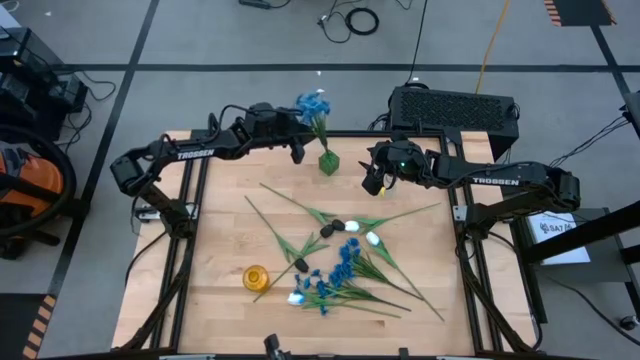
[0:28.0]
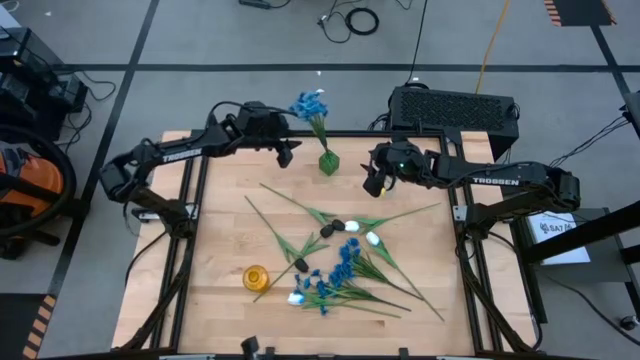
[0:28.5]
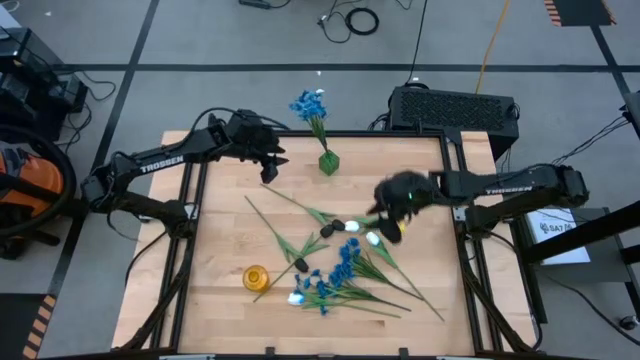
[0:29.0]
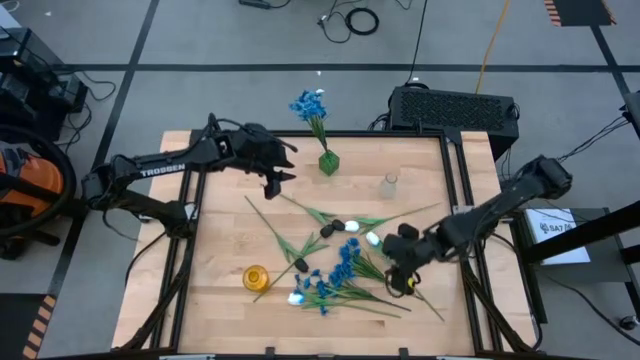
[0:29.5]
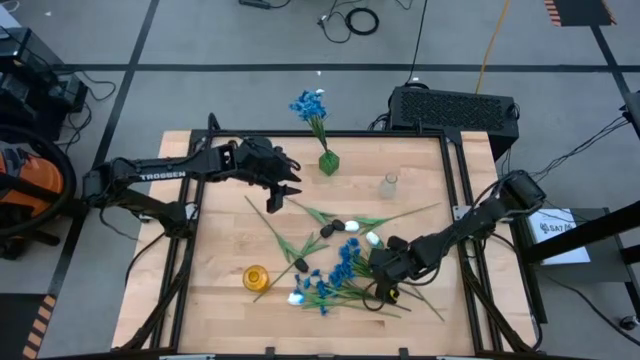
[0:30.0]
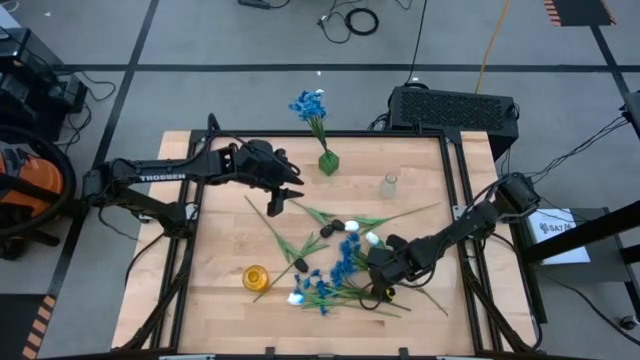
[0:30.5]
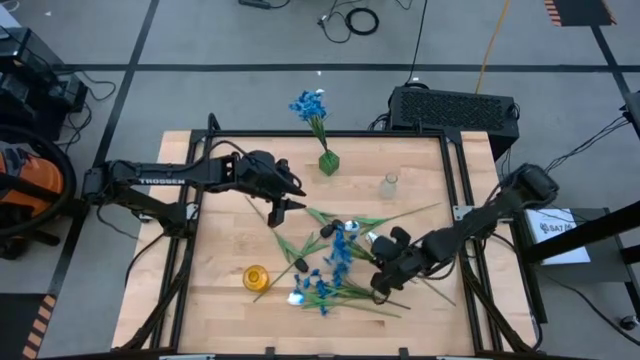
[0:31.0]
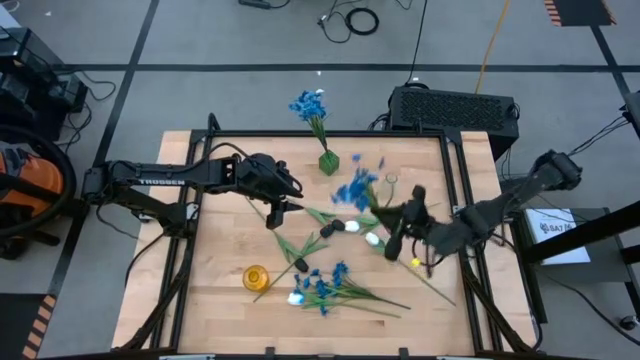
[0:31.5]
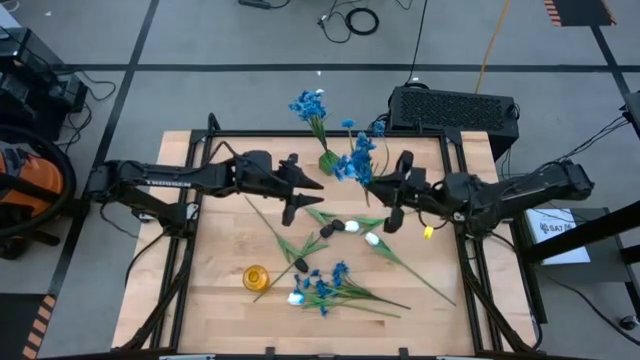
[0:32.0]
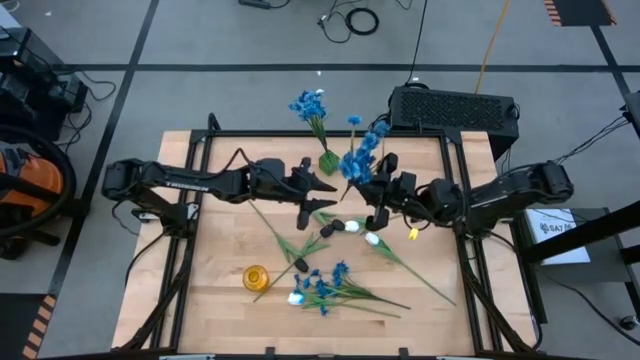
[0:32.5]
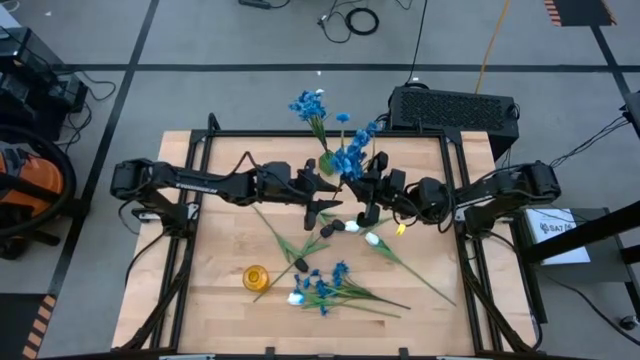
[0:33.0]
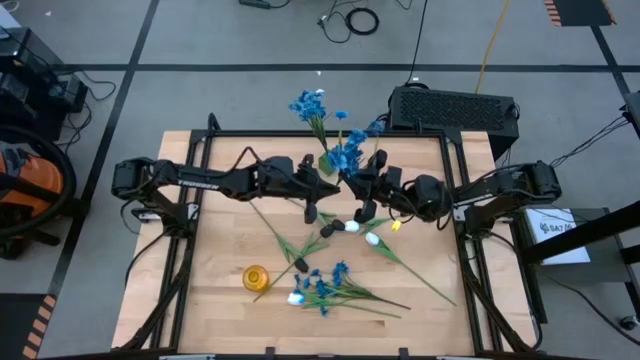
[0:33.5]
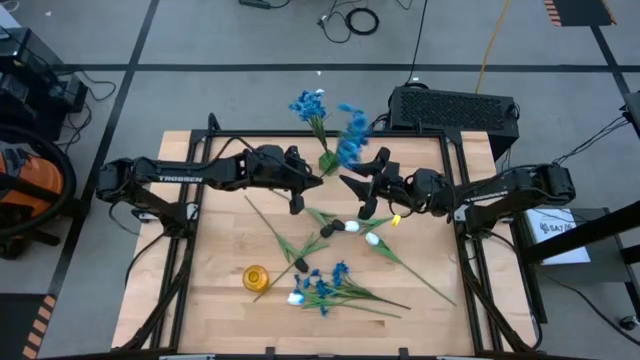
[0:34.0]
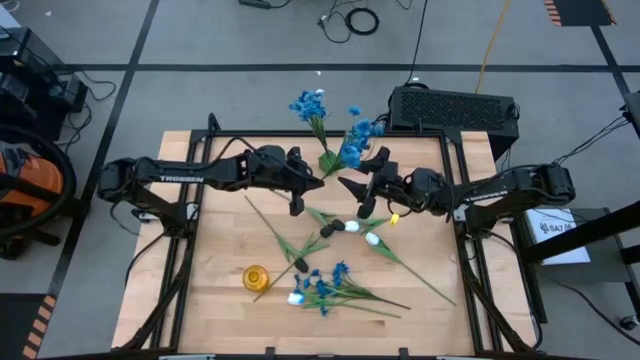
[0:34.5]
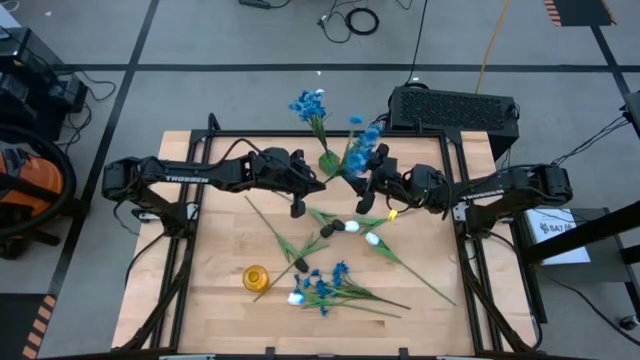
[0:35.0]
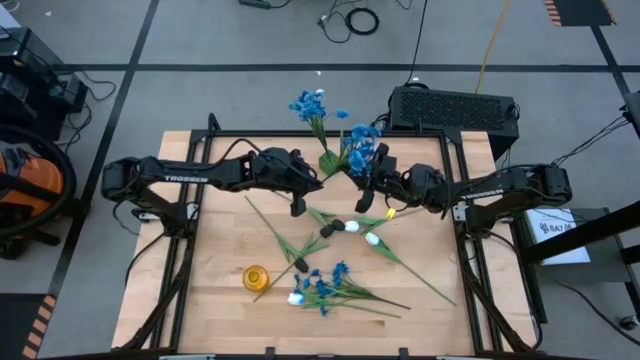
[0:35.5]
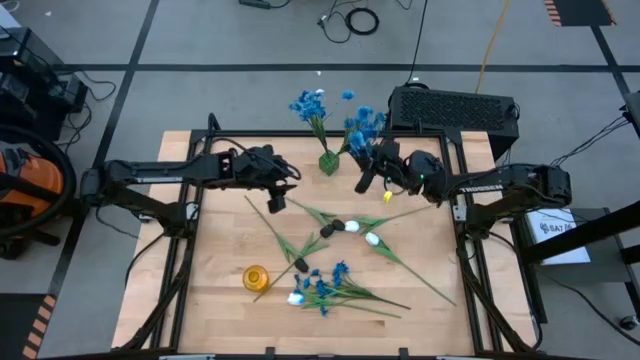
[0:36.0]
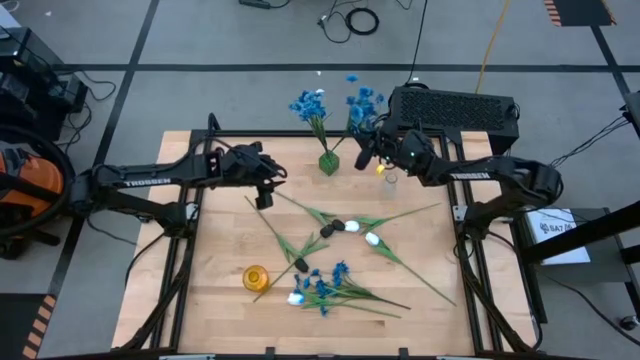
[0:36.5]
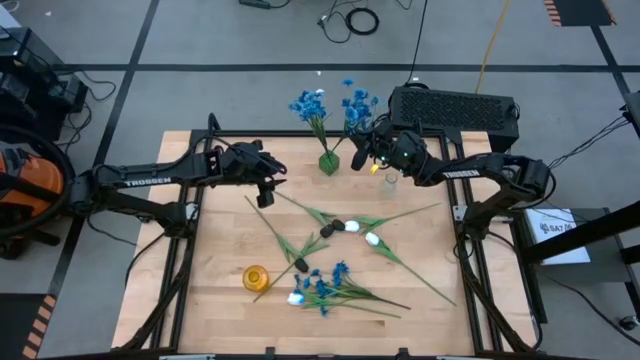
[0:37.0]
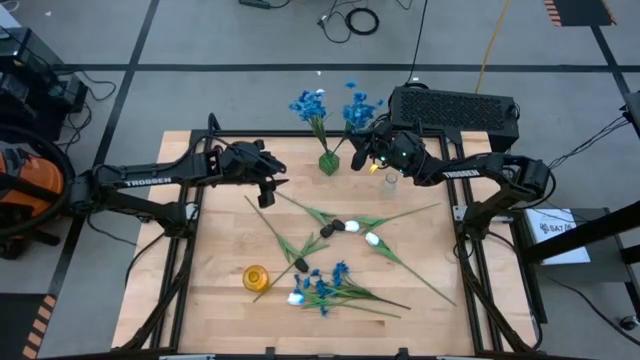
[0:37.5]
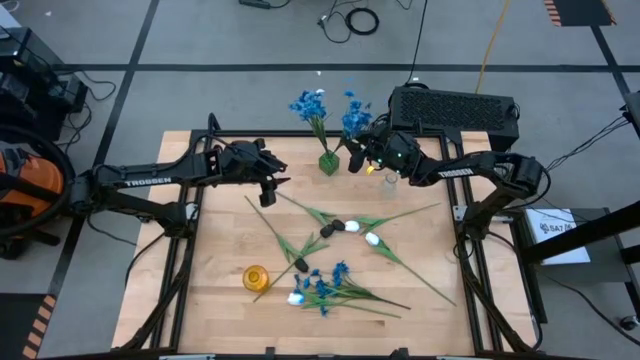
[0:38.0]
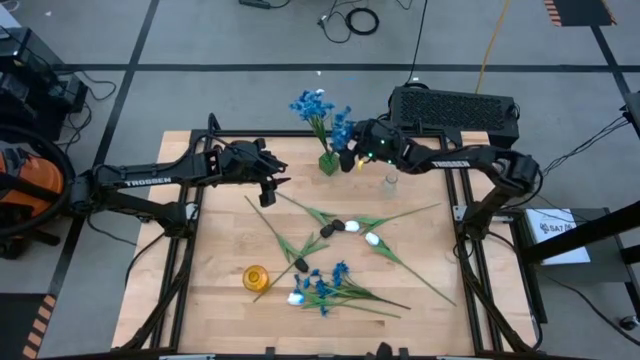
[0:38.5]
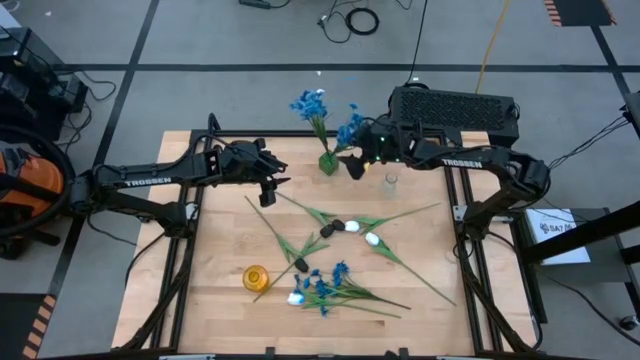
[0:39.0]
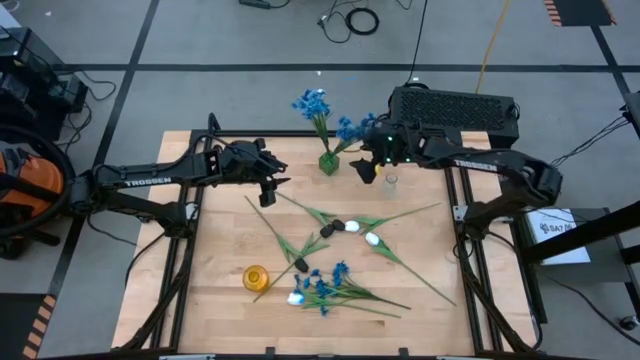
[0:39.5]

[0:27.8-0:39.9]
Task: Sort flowers into vase by color
Put the top blue flowers into the green vase

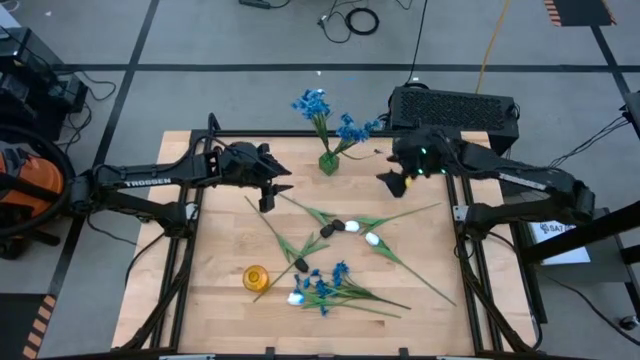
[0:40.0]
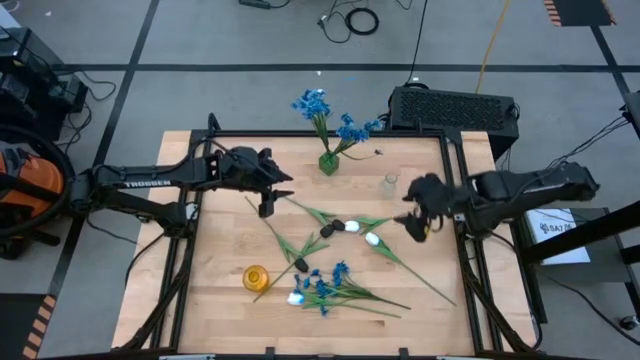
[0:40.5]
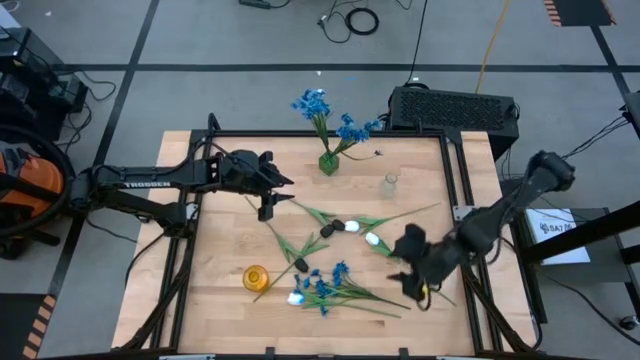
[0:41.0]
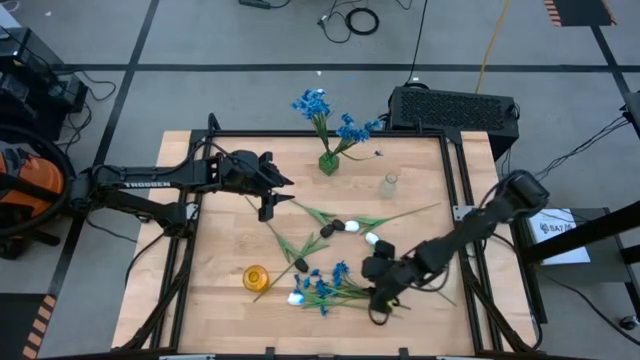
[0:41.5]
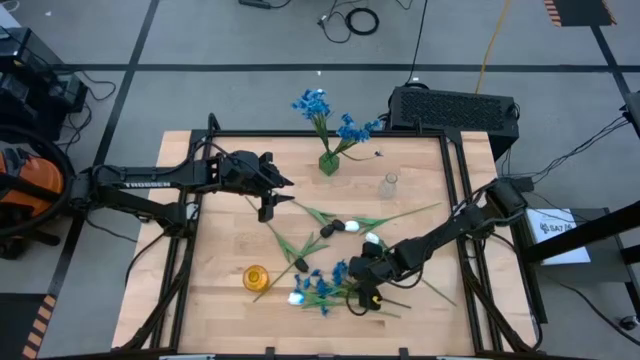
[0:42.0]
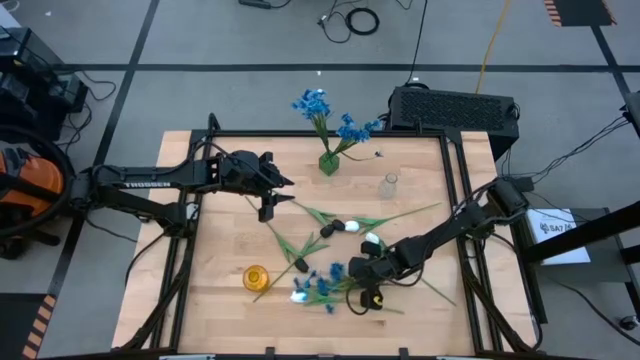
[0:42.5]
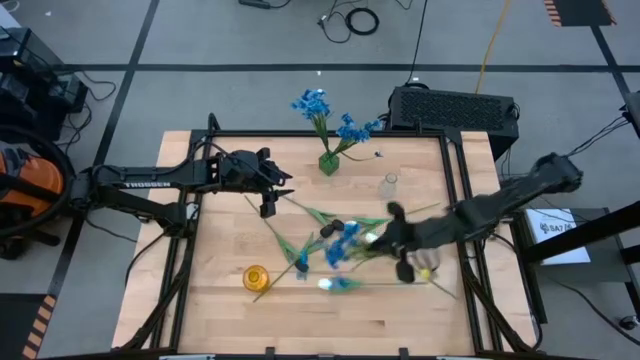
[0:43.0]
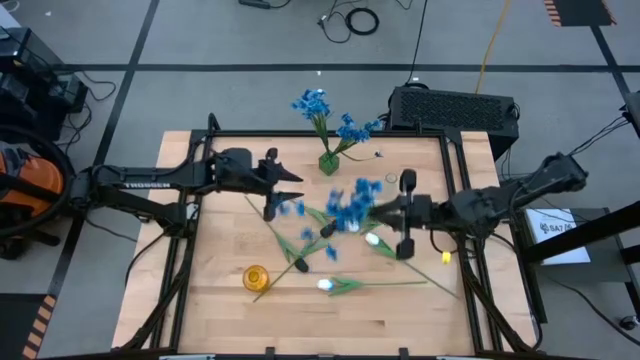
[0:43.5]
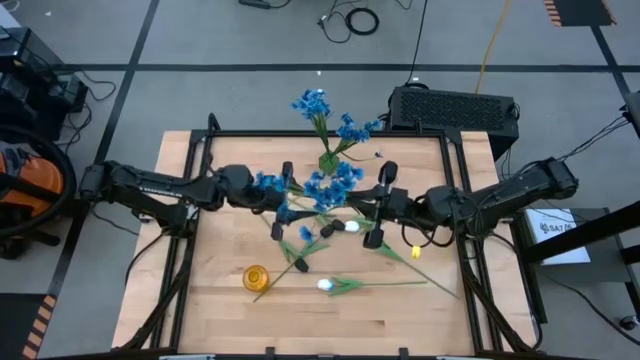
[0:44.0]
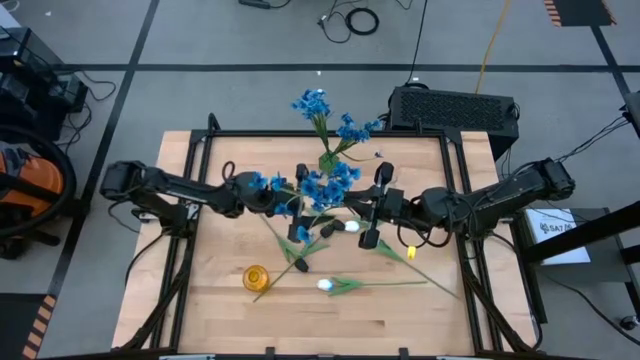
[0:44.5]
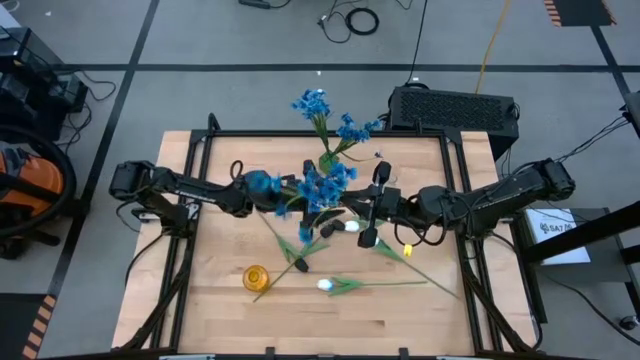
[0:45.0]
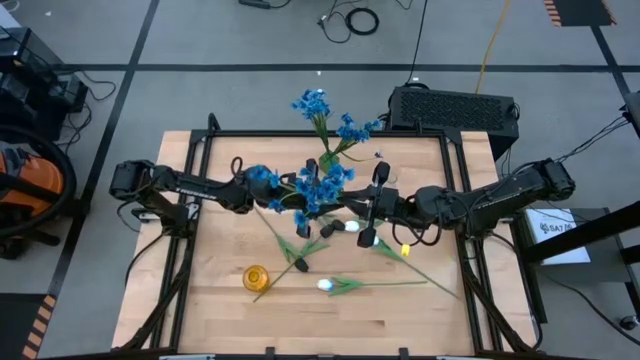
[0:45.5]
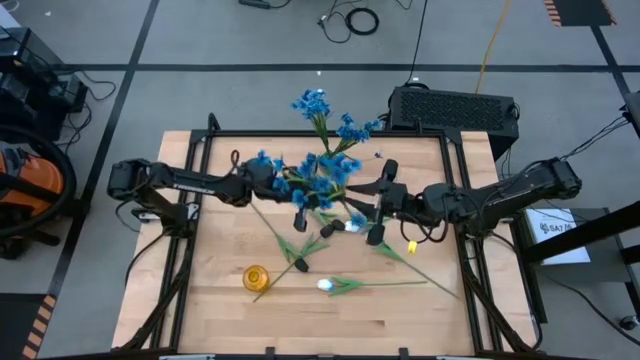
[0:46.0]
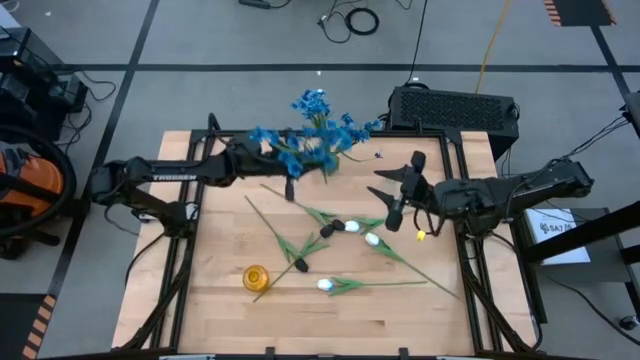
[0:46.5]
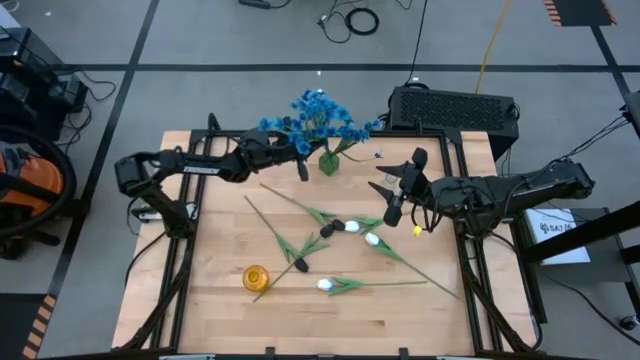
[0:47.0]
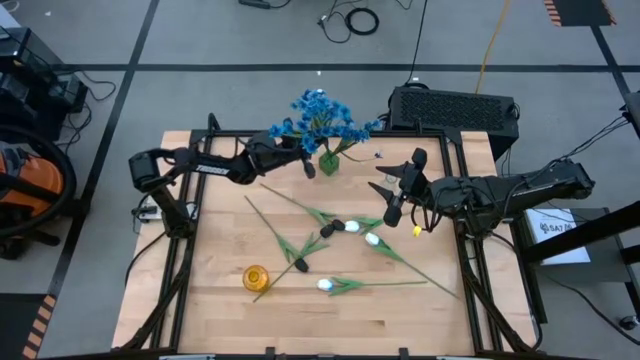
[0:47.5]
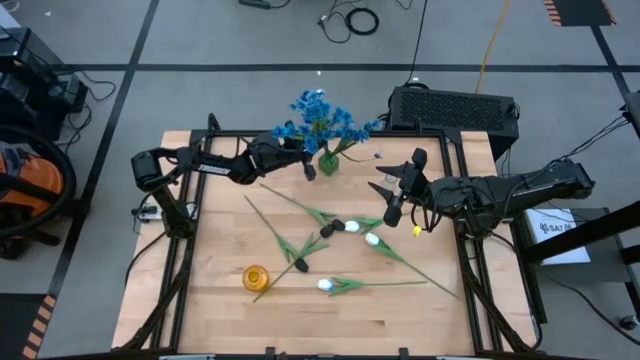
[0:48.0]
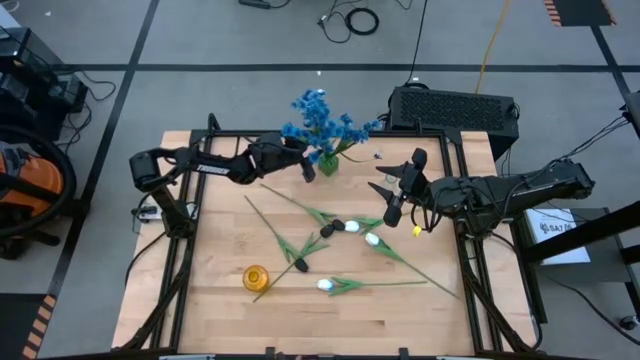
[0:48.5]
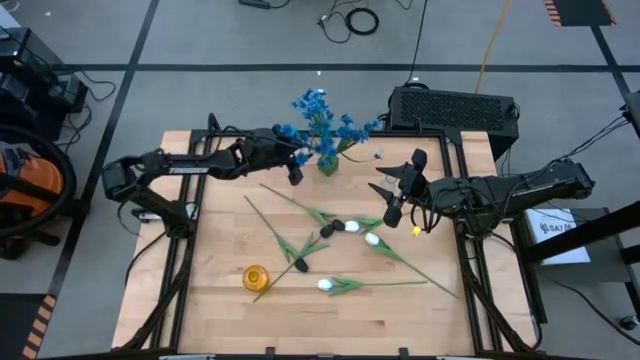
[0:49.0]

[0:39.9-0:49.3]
Put the blue flowers into the green vase

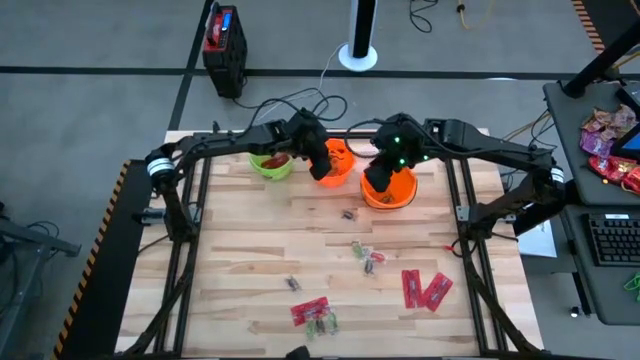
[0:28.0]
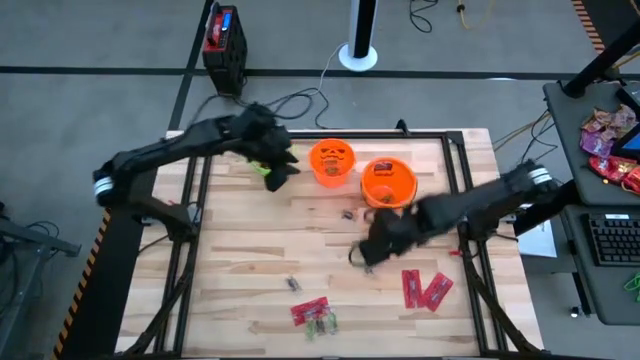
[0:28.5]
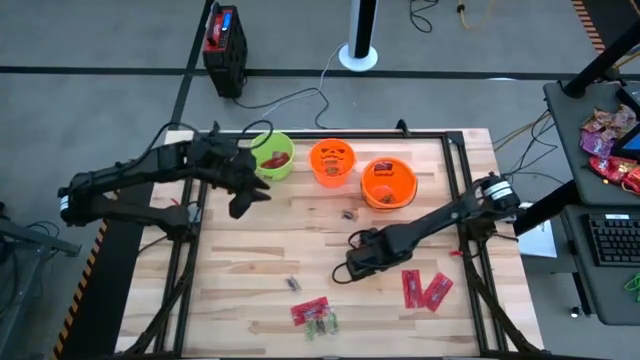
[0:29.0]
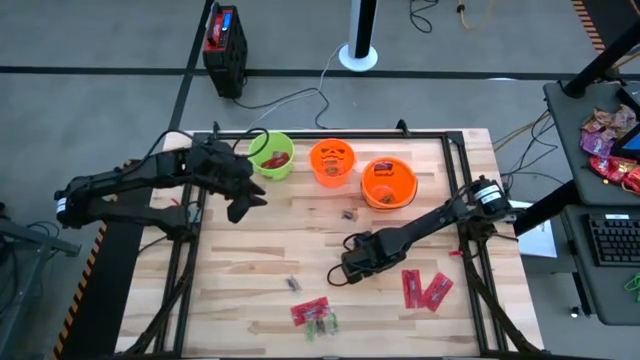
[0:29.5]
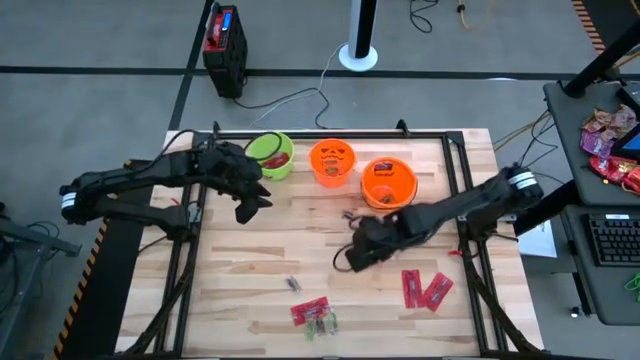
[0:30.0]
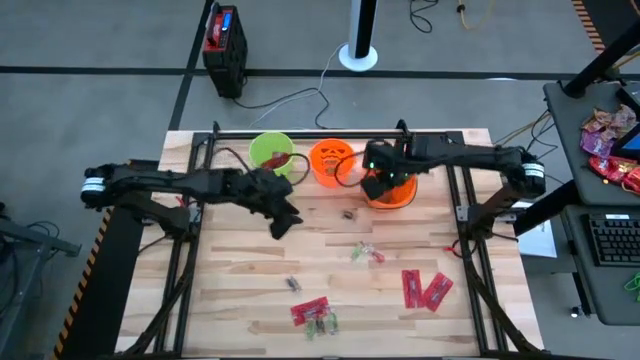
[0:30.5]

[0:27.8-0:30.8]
Task: Sort candy by brand, put in halloween buckets
Put the black candy into the right orange bucket
